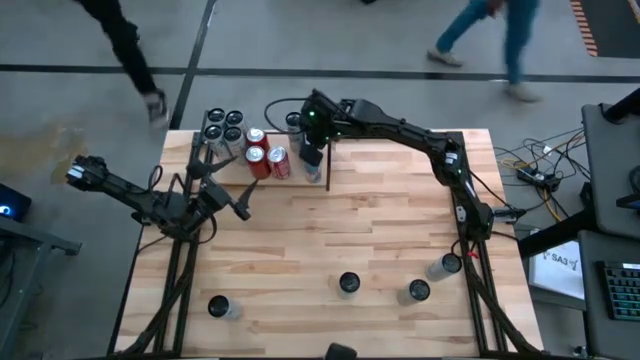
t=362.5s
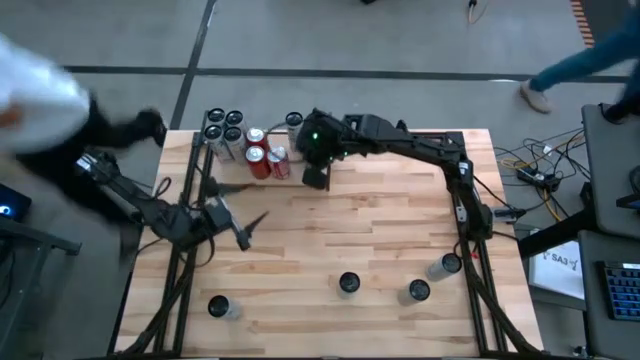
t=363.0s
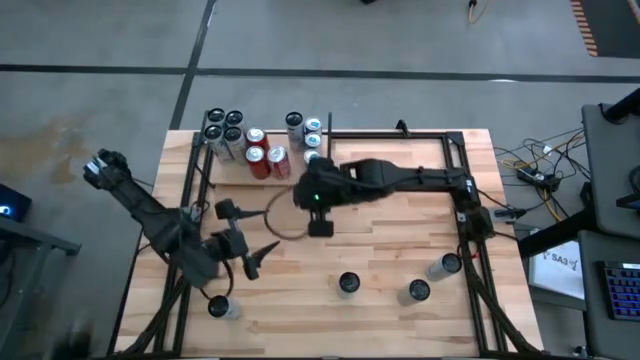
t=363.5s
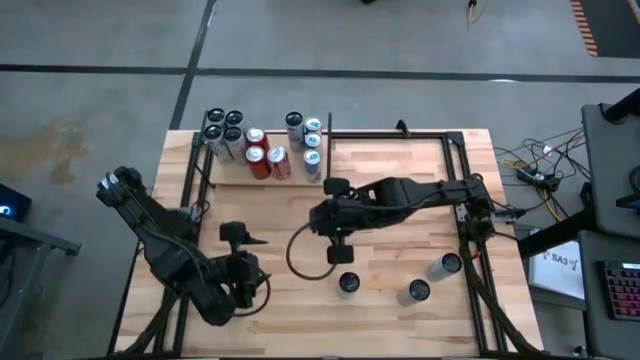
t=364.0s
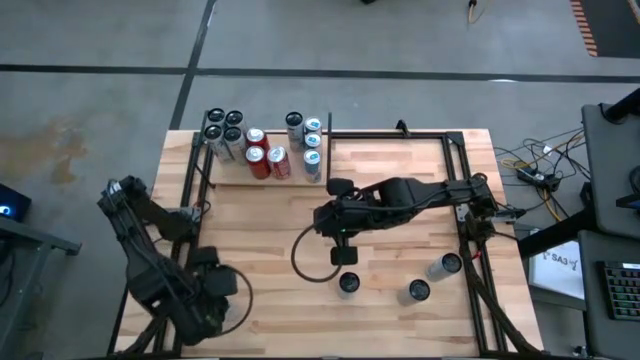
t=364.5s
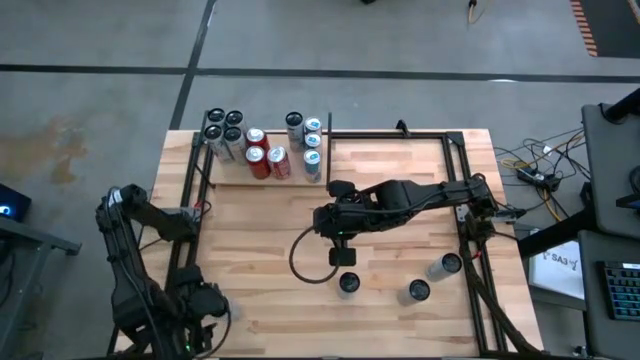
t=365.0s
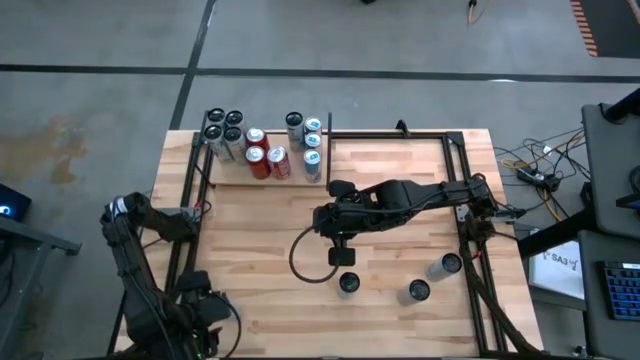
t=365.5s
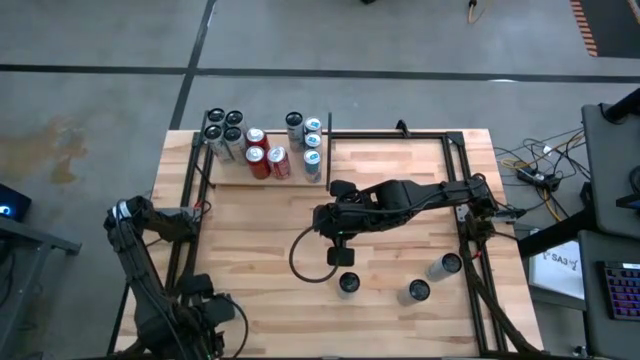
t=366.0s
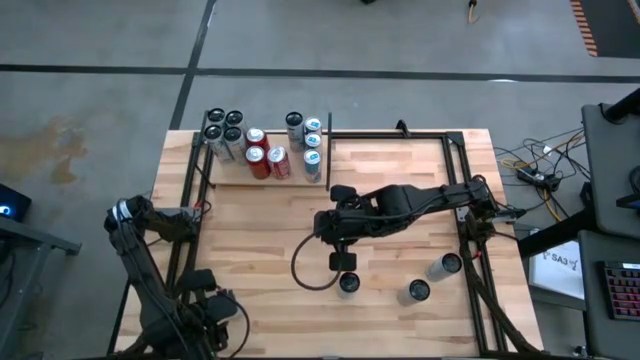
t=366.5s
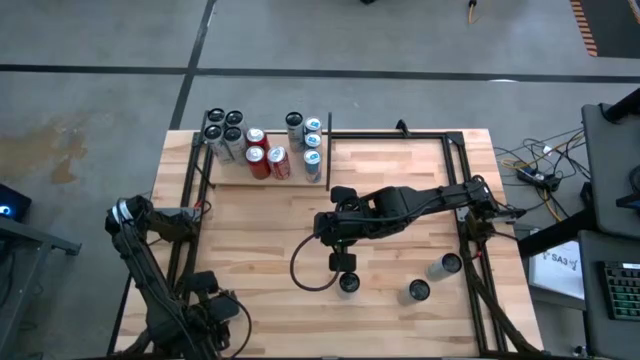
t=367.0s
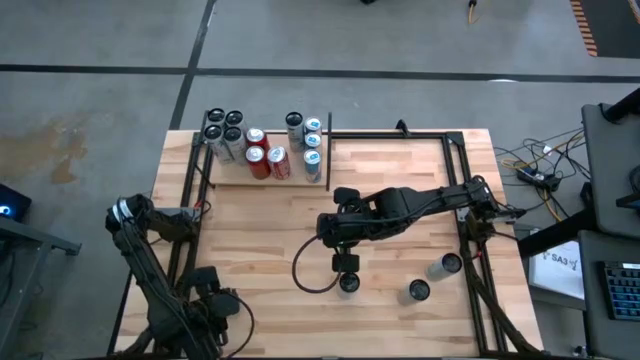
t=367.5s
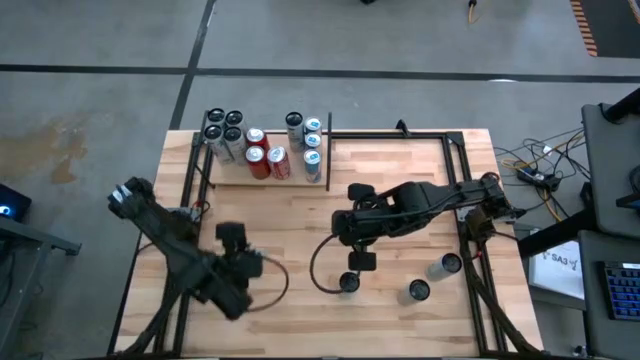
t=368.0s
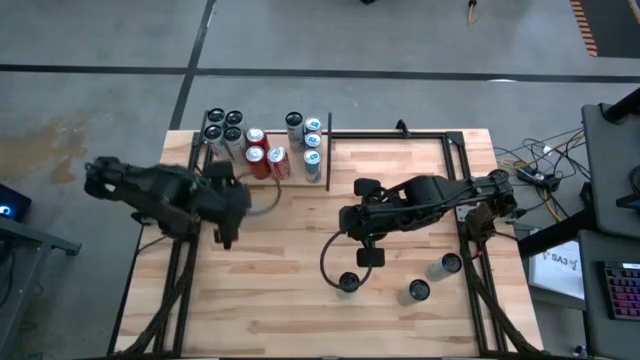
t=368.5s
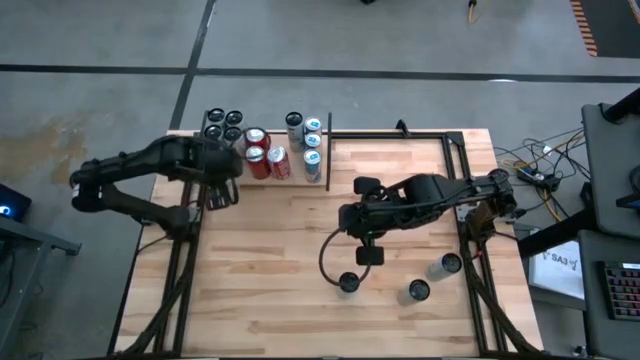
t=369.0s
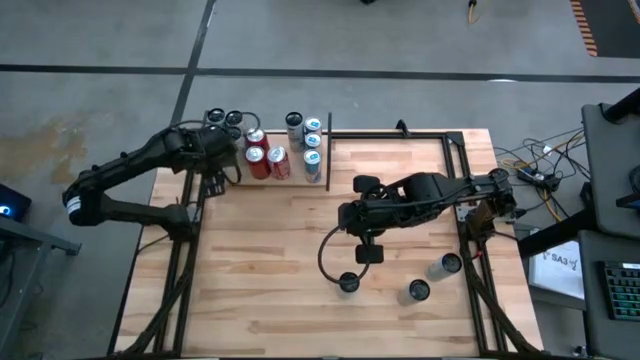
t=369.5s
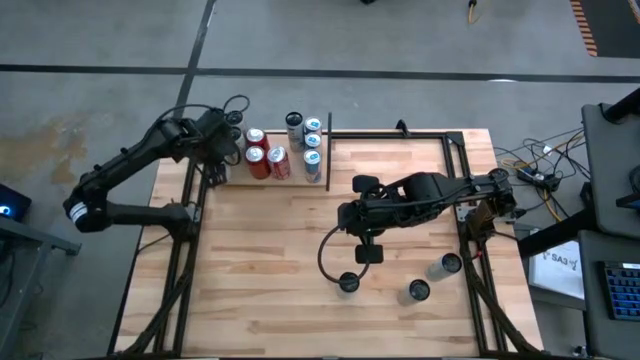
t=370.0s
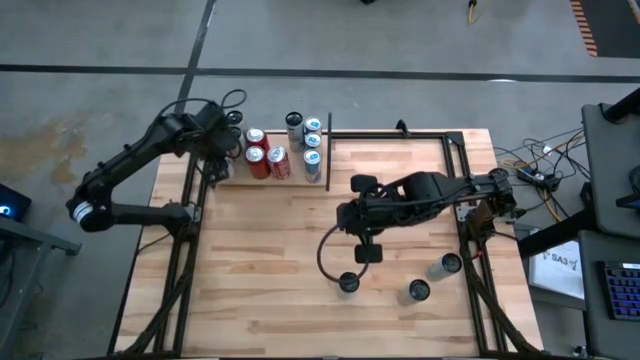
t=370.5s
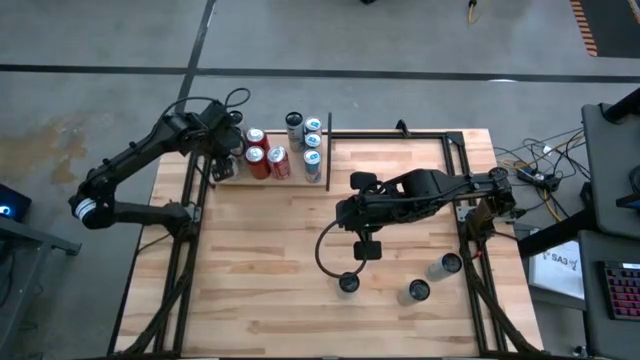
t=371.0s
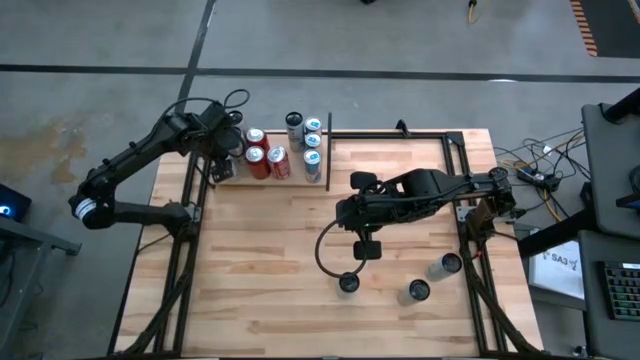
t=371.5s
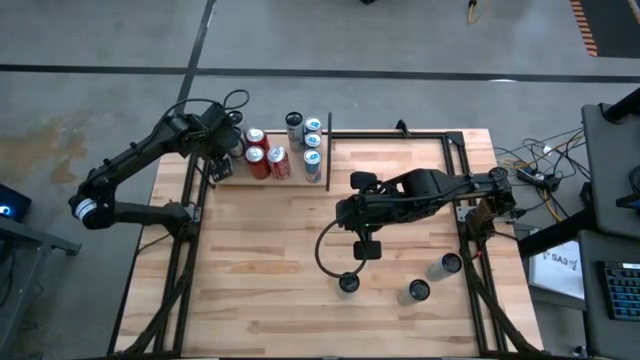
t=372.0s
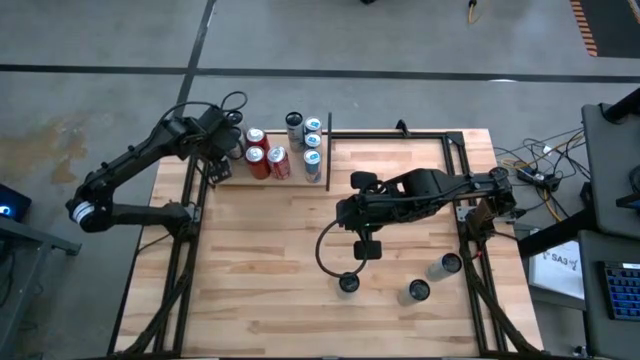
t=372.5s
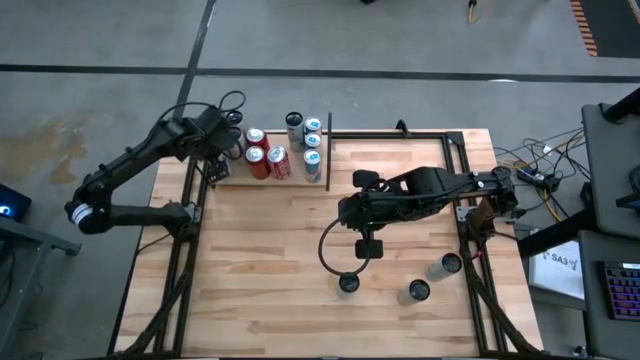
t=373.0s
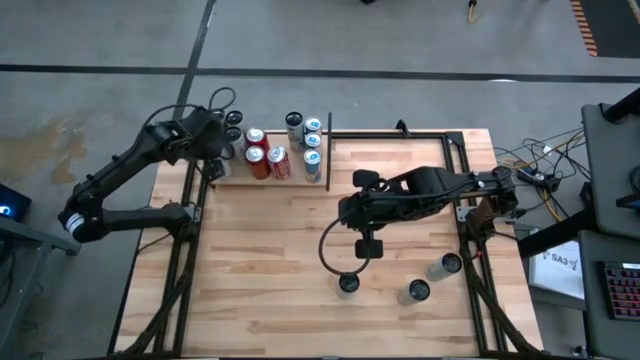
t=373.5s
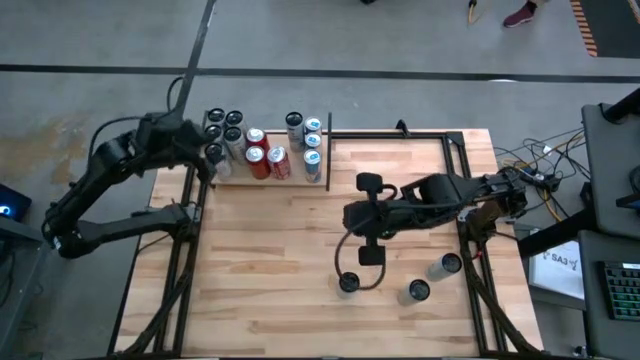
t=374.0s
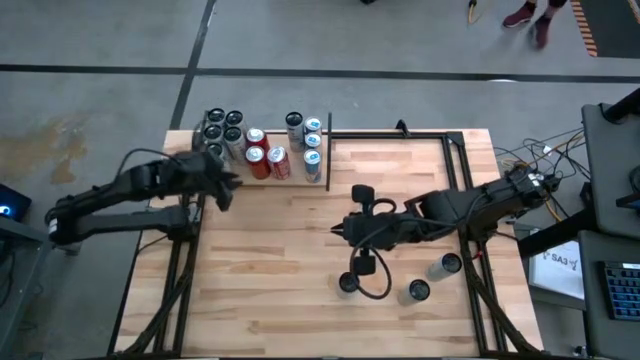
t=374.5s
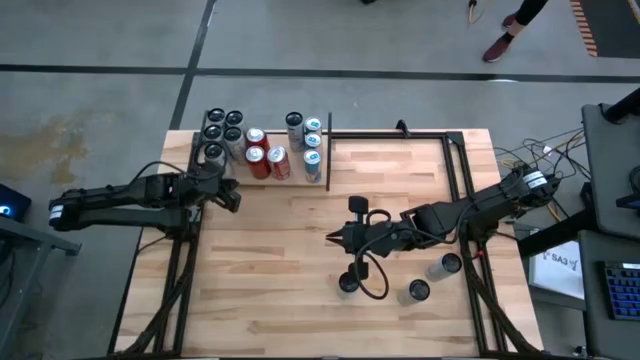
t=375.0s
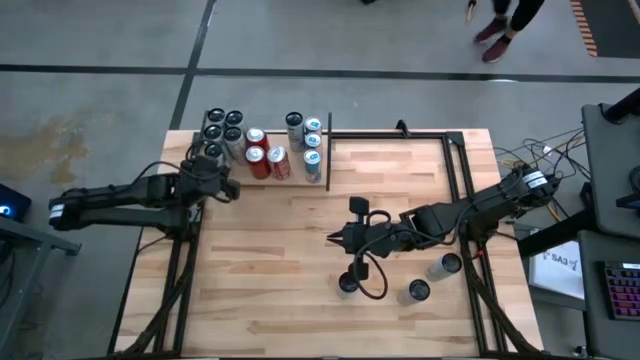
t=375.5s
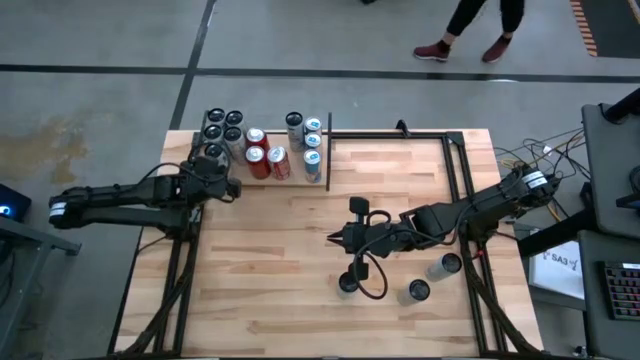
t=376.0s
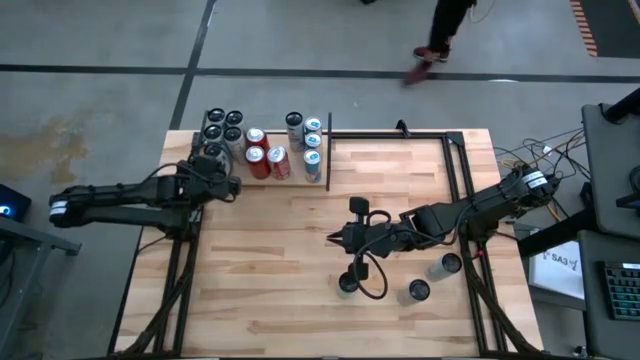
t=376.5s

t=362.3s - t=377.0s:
Task: Place canned beverage on shelf
Put the white and pink soda can on the shelf aligned with the other white and pink soda cans

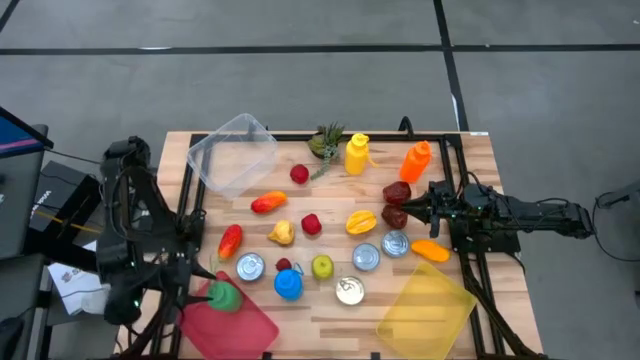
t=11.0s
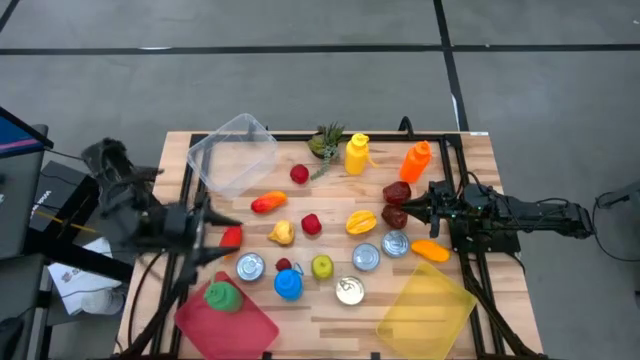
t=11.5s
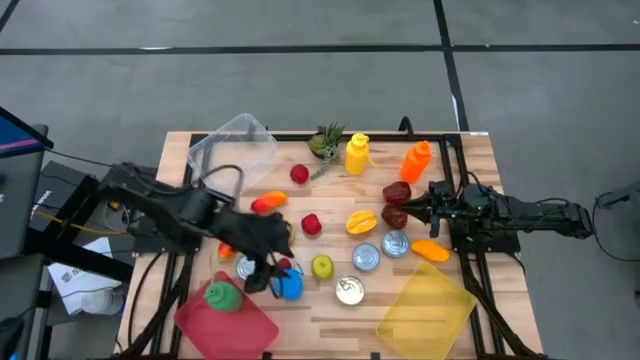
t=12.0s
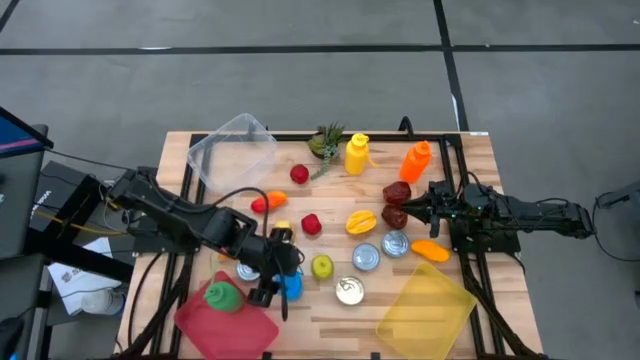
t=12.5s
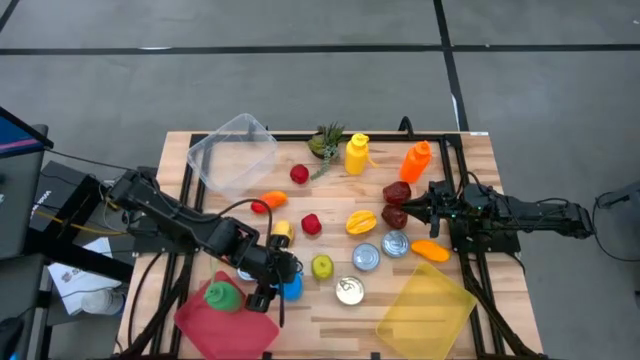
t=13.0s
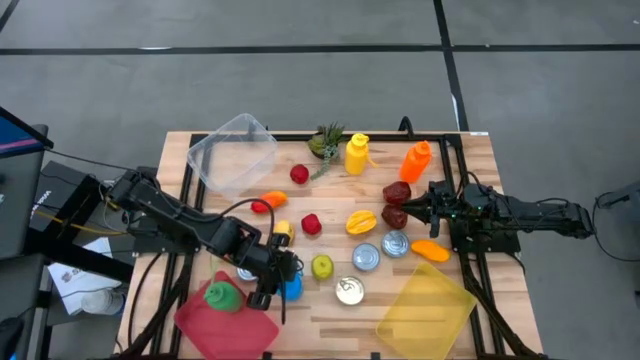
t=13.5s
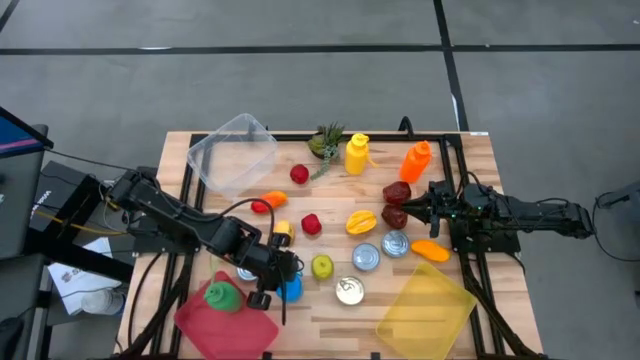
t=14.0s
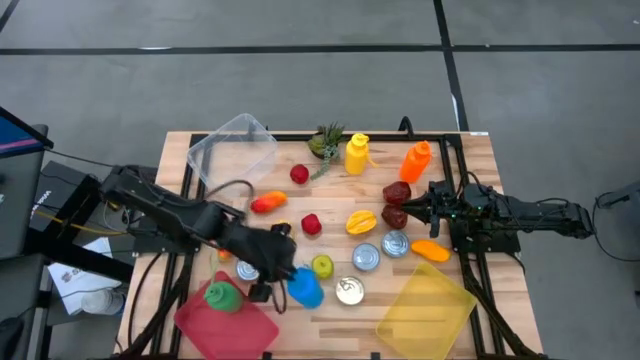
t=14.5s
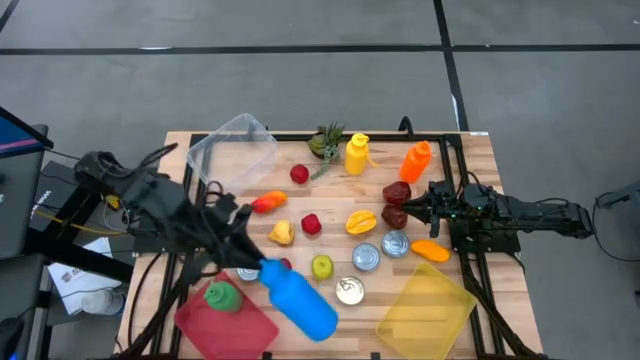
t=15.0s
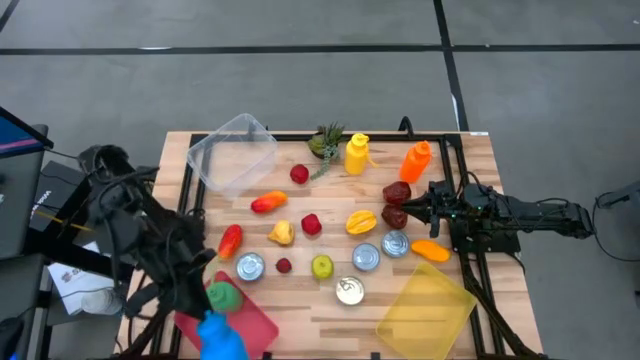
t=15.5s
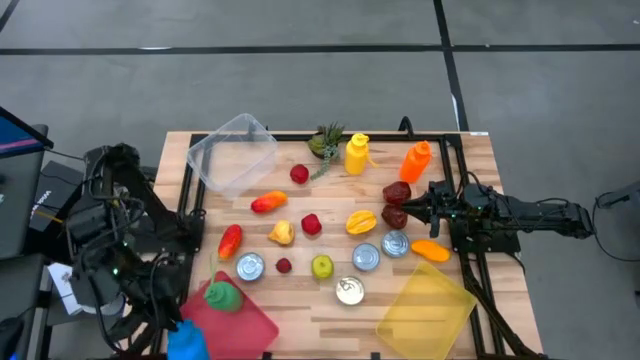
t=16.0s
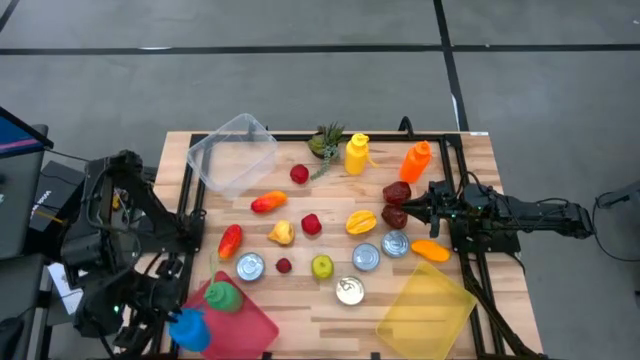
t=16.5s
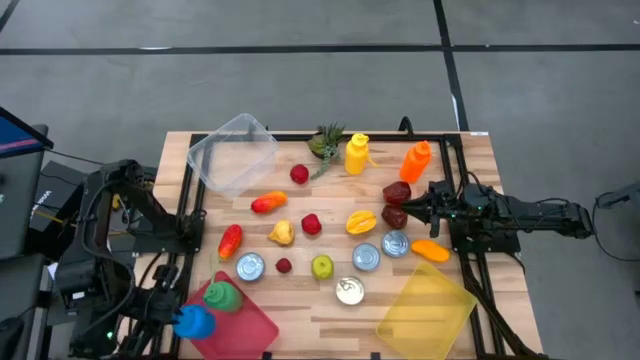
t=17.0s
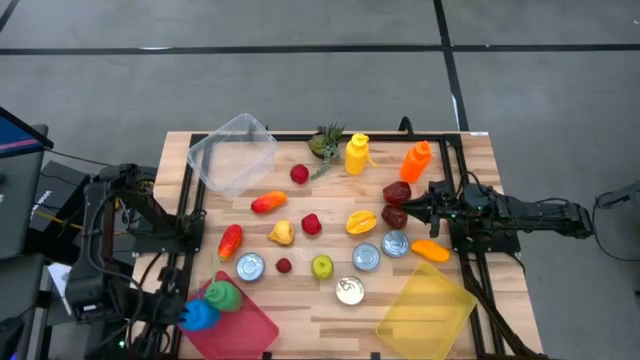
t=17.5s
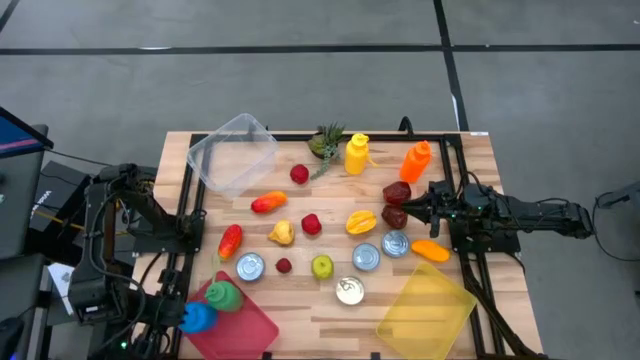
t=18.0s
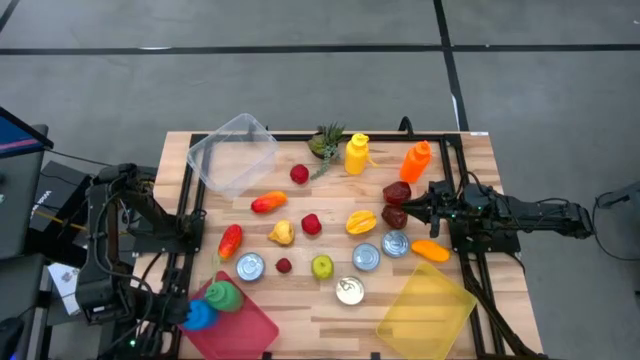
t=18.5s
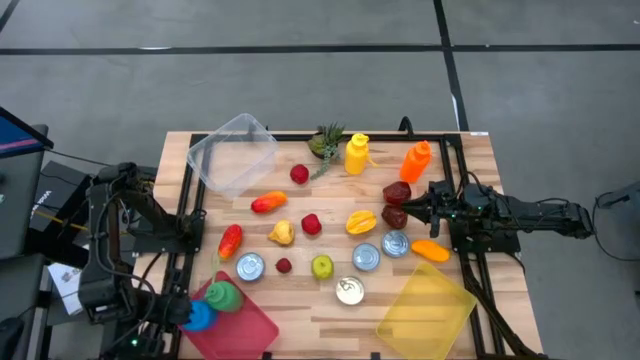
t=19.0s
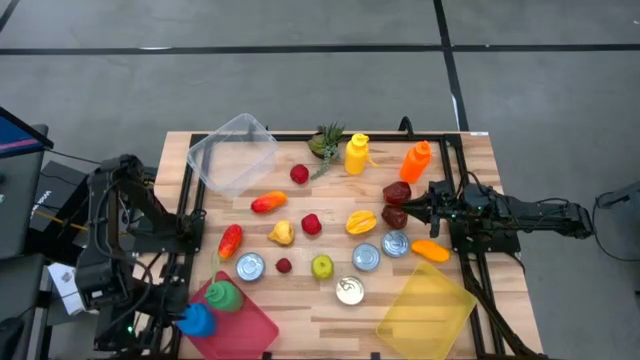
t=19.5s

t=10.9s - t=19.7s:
Task: Pick & Place Food Item
Put the blue water bottle into the red bin
